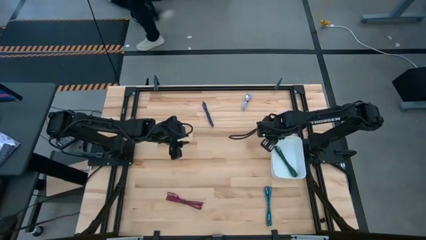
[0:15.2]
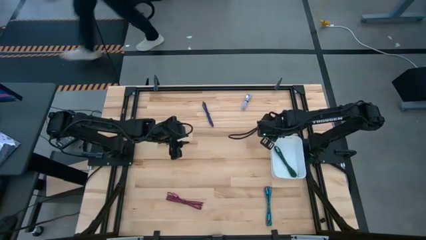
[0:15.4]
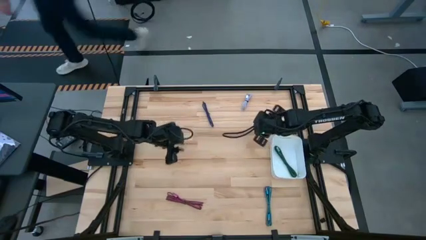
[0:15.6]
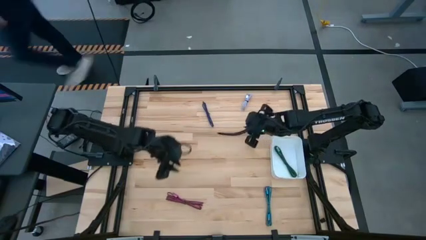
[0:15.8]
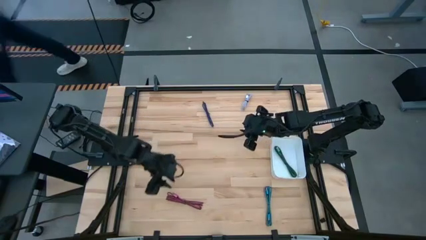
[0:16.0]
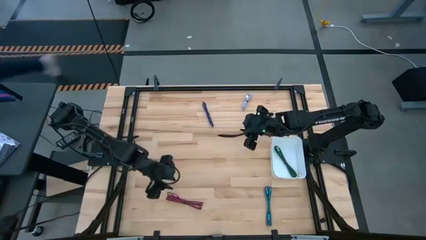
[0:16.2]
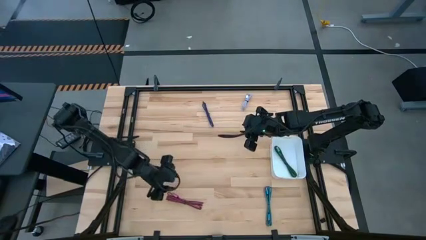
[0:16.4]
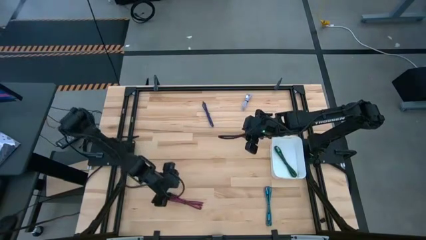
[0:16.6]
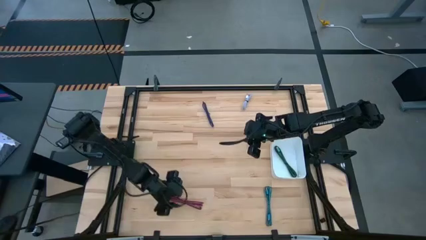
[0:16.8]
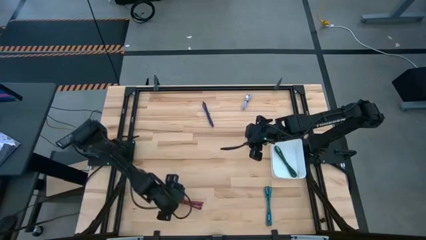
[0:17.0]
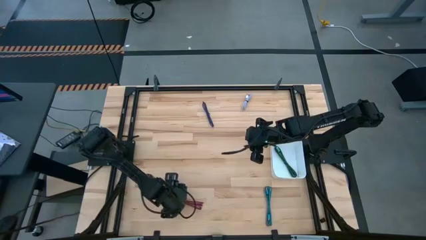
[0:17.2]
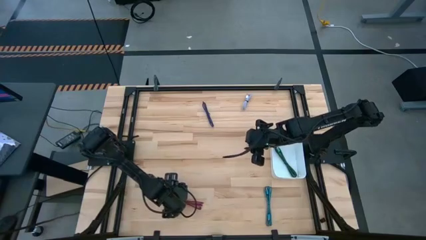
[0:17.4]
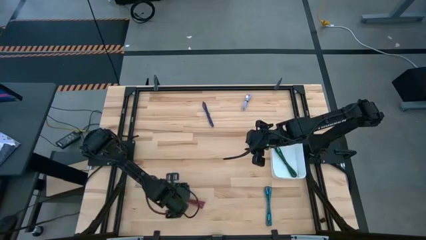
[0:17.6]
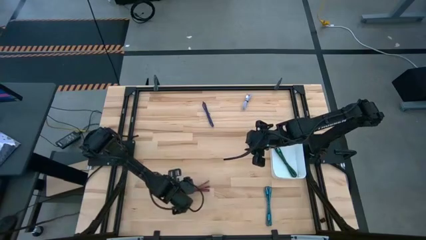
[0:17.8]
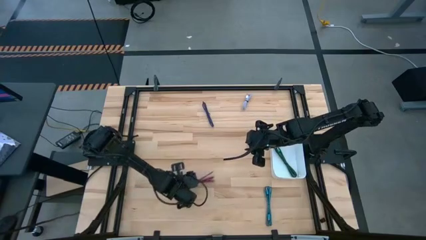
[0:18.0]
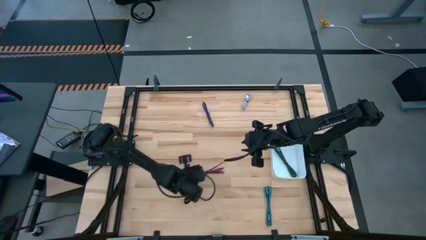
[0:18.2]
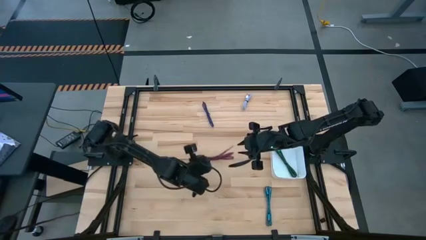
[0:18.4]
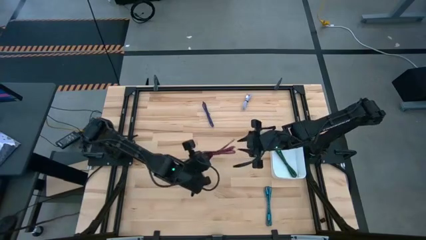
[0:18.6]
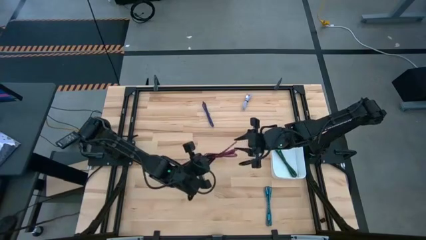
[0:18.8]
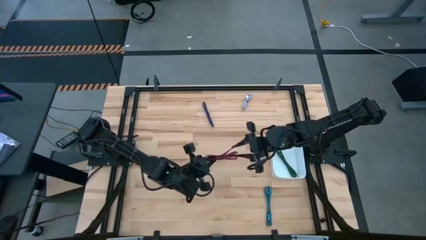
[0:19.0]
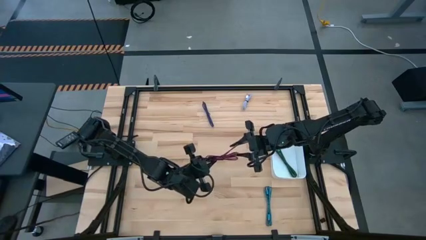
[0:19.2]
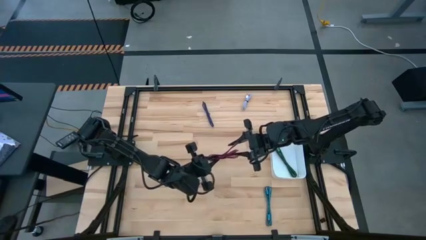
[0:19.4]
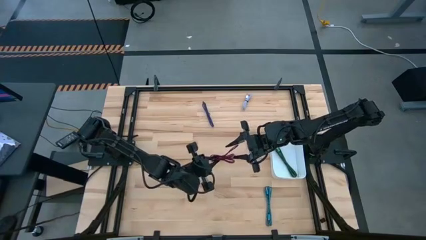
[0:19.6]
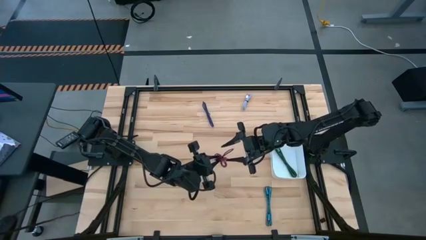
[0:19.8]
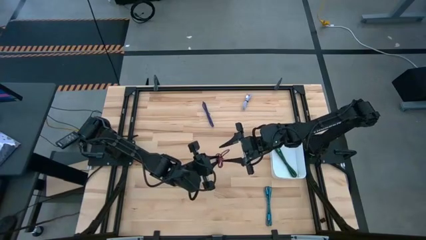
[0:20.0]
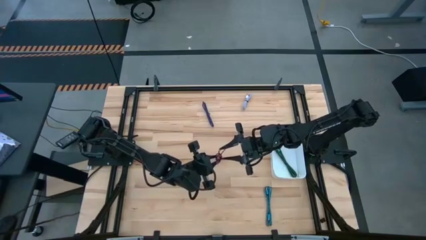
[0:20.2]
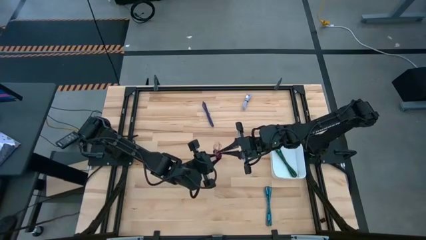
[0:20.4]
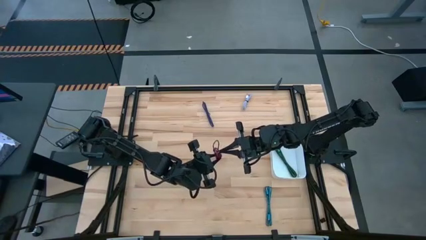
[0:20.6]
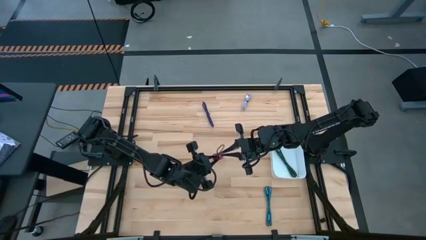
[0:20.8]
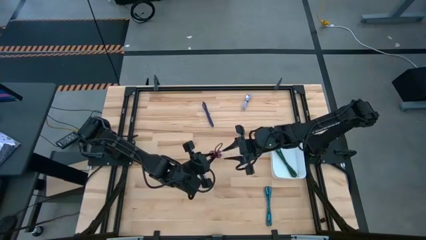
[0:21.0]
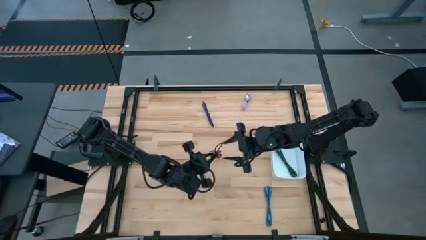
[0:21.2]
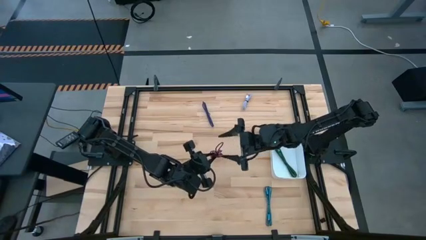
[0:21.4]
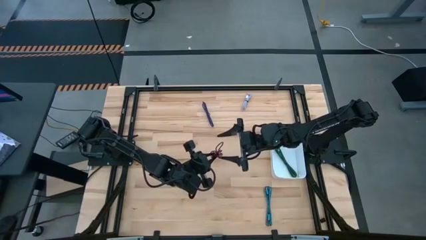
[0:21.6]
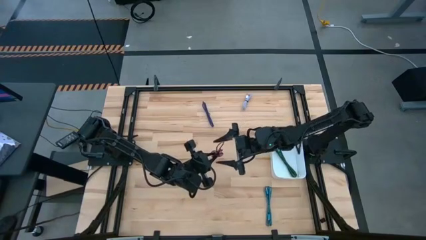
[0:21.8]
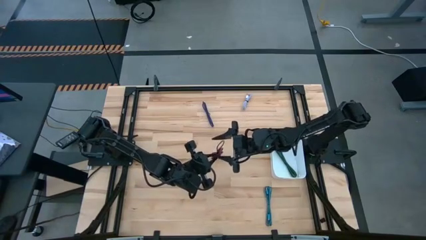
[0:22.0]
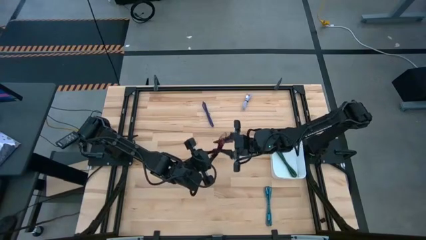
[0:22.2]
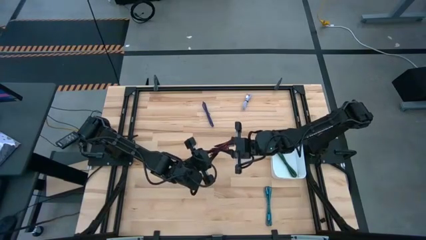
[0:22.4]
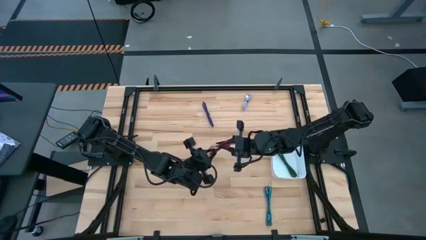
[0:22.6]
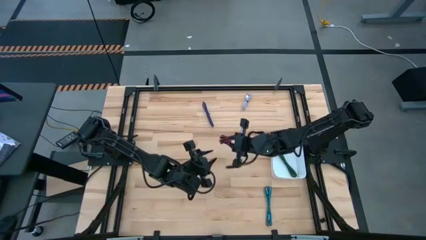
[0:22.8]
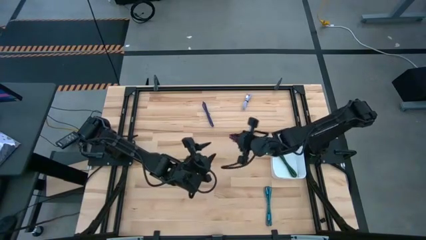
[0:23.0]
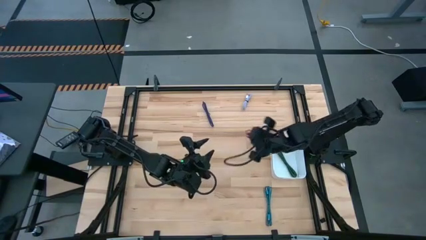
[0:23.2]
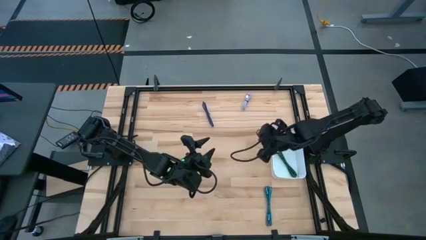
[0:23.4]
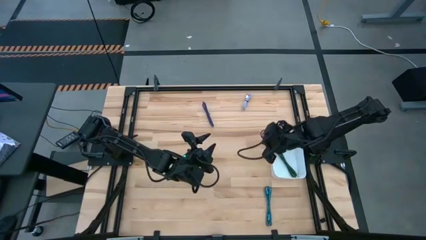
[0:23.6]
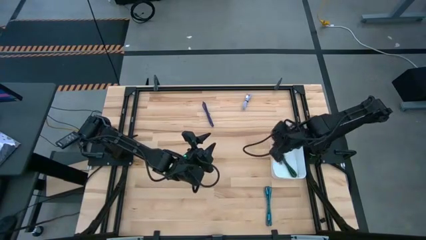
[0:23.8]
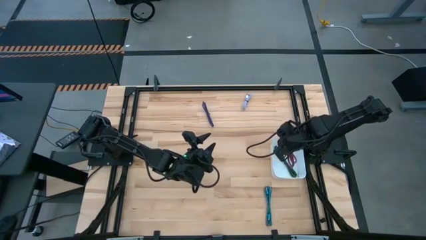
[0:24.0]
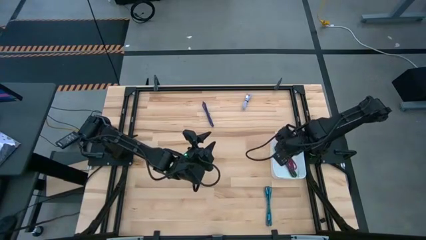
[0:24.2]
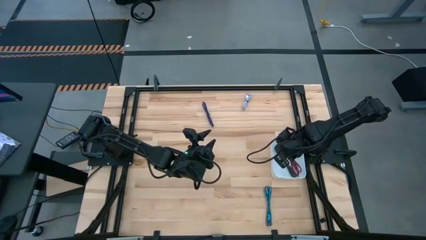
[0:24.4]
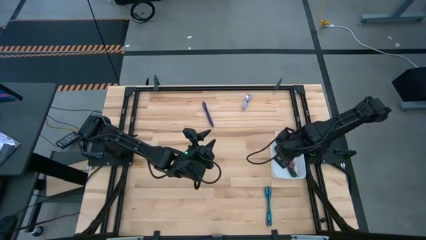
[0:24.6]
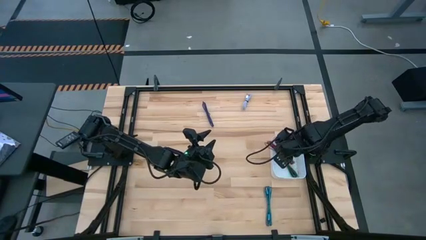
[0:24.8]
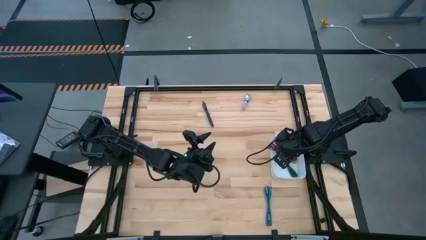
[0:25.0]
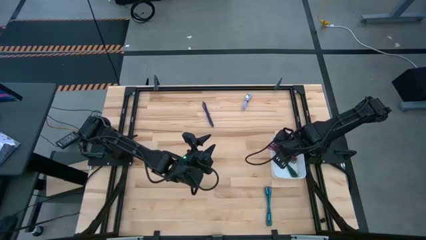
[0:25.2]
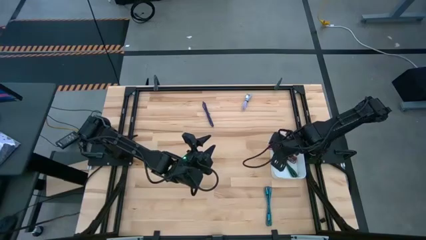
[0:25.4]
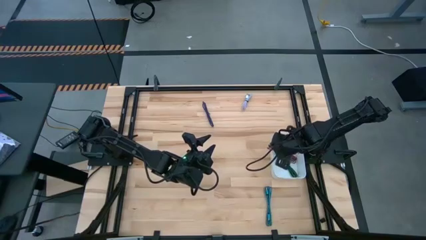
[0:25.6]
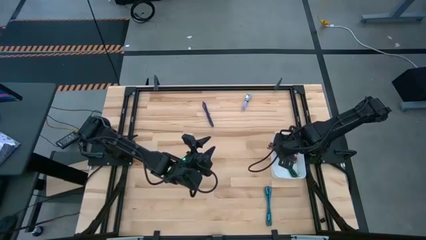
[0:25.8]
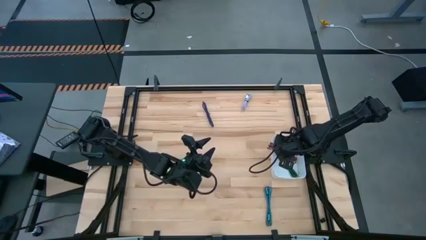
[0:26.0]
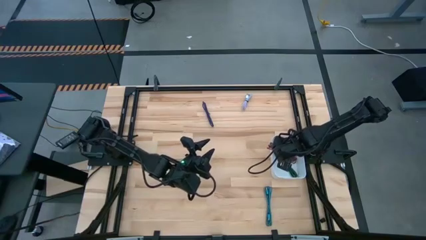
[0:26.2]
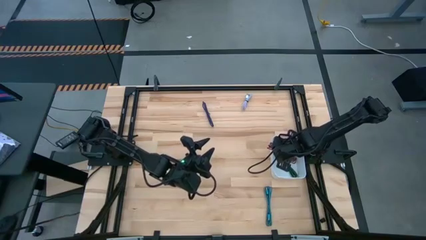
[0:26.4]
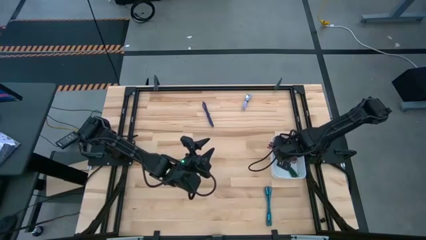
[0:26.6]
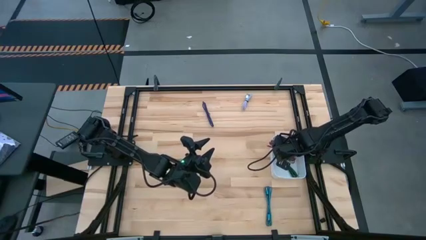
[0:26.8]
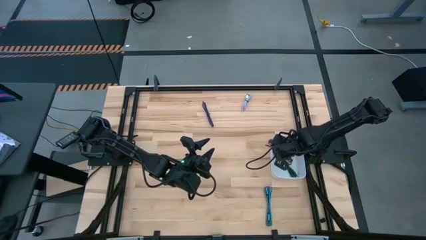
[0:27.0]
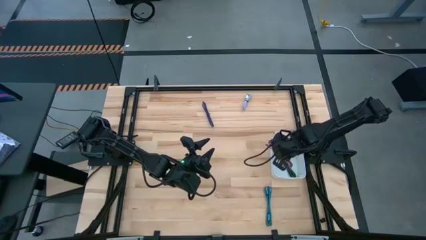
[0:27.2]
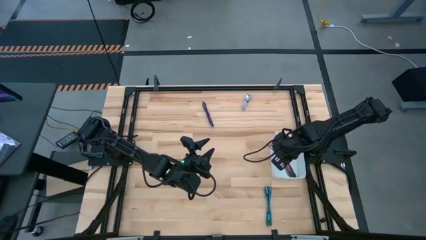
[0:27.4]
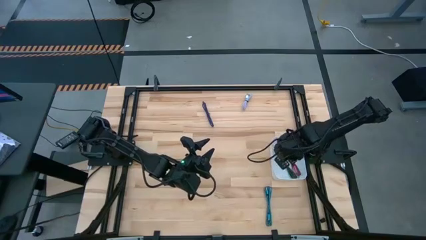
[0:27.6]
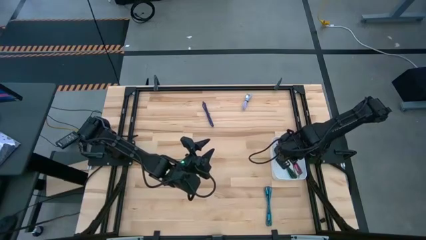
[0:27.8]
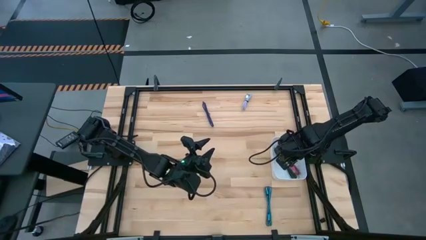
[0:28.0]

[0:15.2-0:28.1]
Task: Pick and place USB-C Cables
Put the pink charger cable into the white bin
